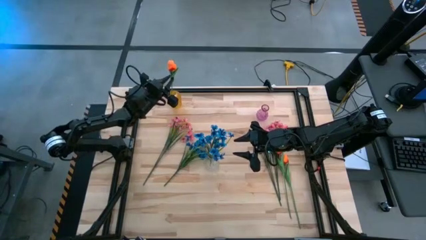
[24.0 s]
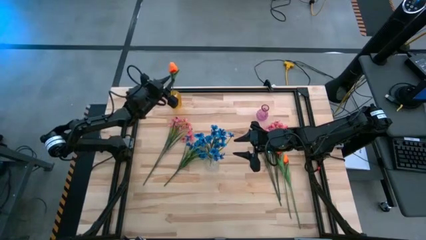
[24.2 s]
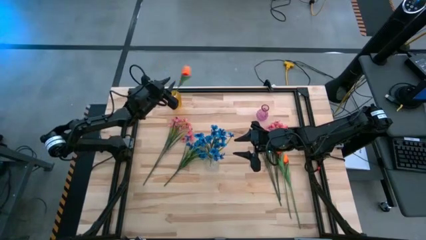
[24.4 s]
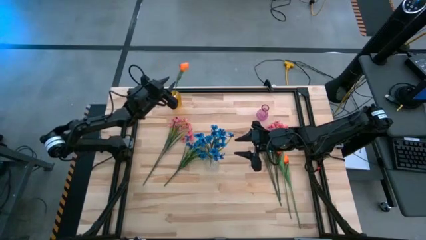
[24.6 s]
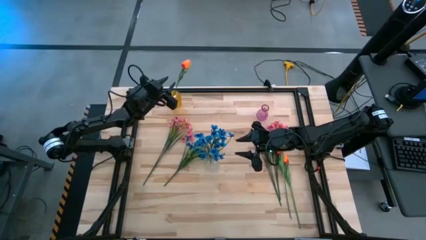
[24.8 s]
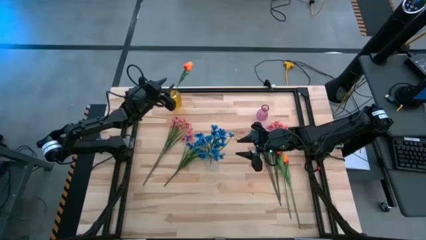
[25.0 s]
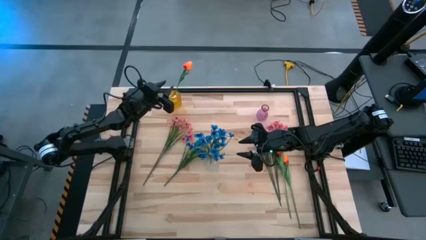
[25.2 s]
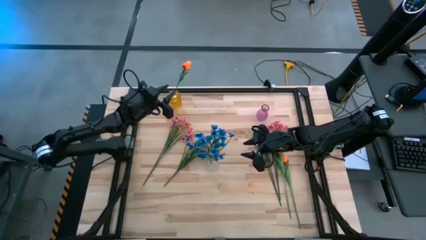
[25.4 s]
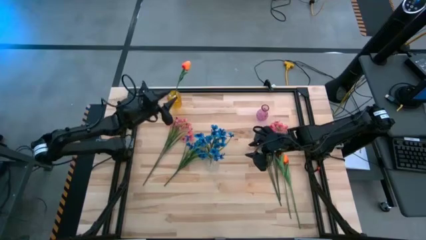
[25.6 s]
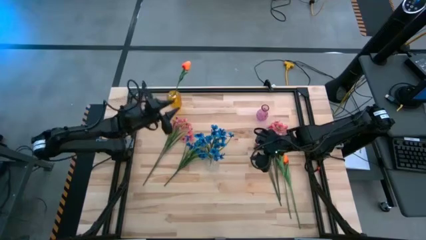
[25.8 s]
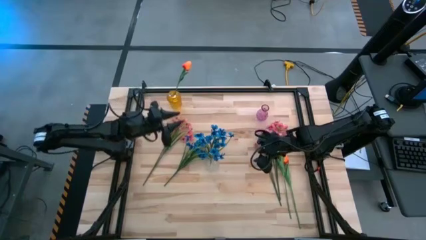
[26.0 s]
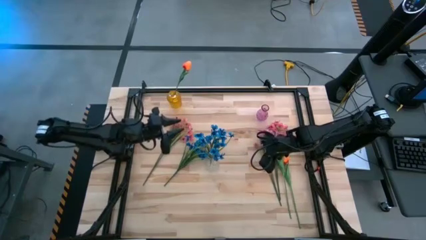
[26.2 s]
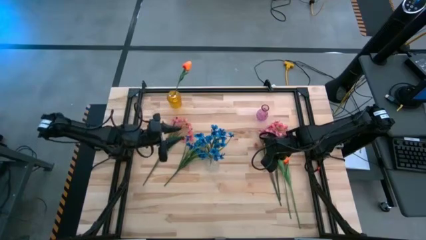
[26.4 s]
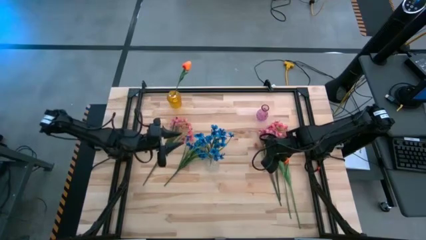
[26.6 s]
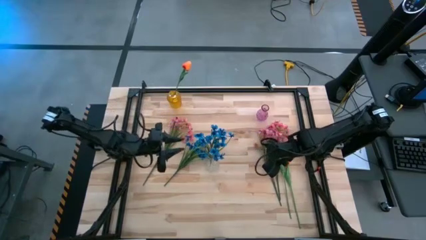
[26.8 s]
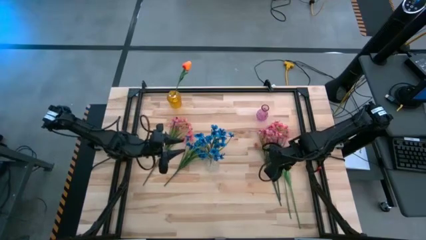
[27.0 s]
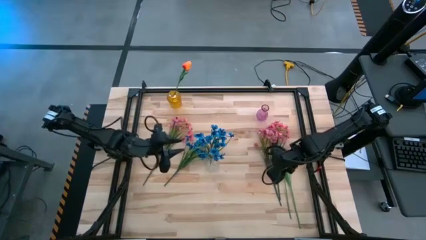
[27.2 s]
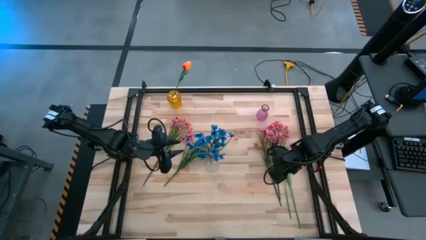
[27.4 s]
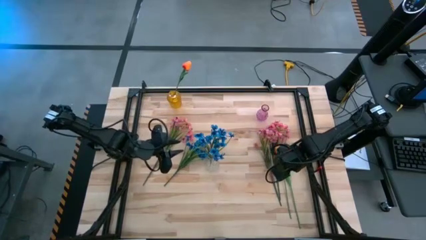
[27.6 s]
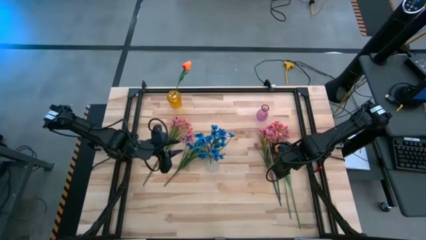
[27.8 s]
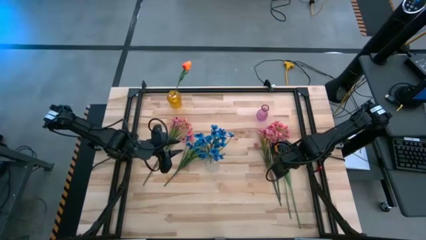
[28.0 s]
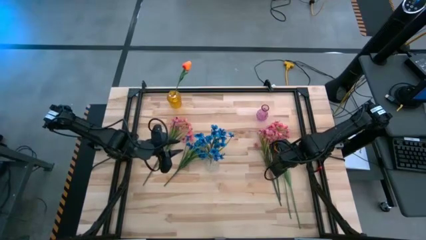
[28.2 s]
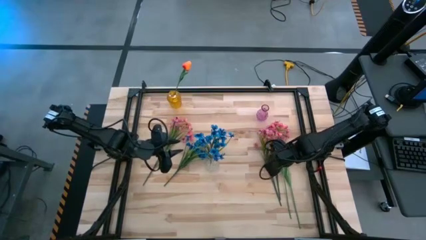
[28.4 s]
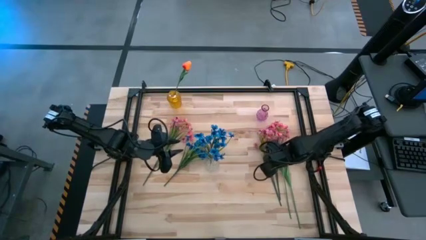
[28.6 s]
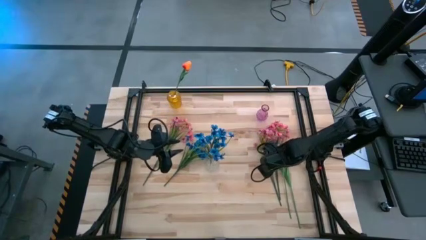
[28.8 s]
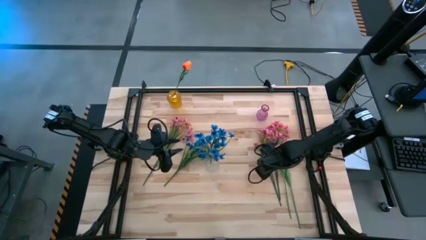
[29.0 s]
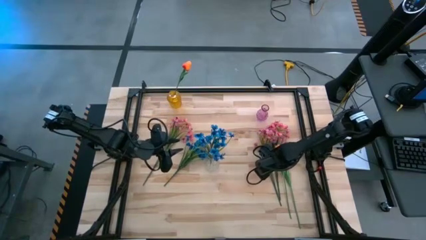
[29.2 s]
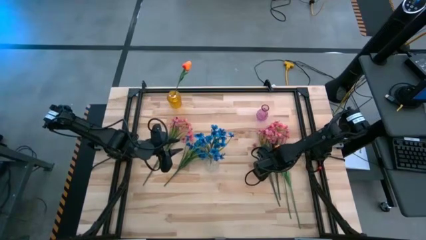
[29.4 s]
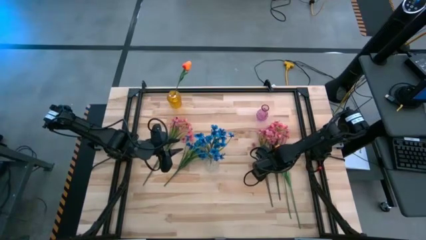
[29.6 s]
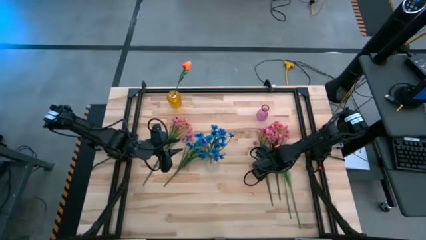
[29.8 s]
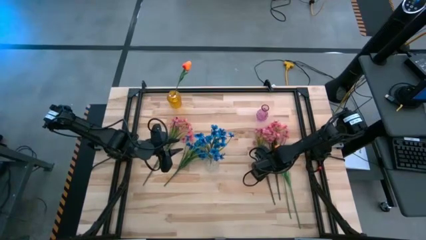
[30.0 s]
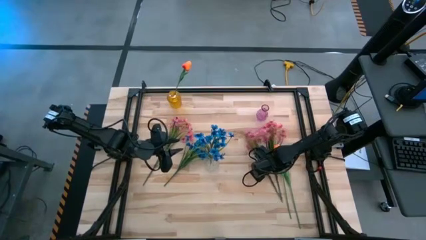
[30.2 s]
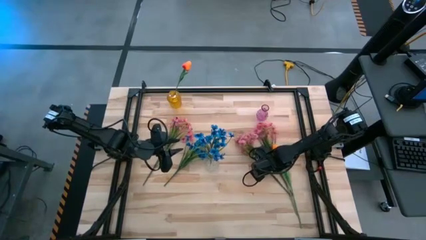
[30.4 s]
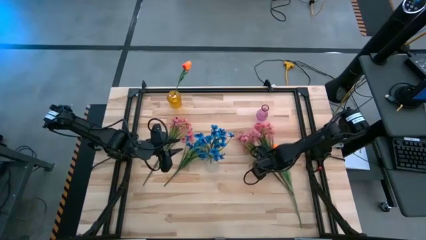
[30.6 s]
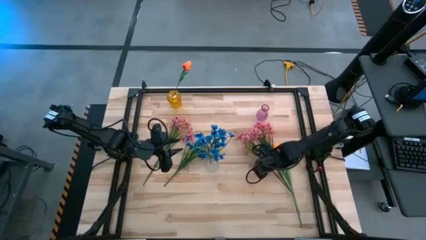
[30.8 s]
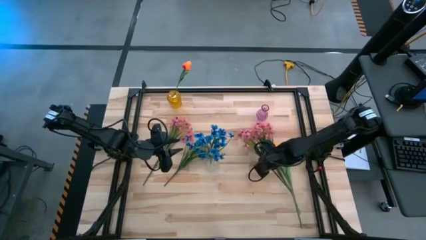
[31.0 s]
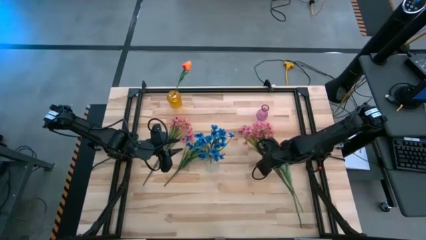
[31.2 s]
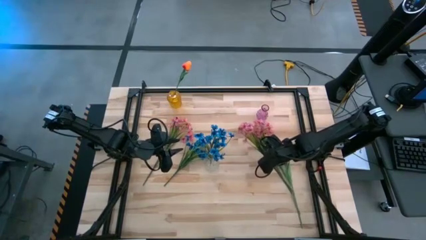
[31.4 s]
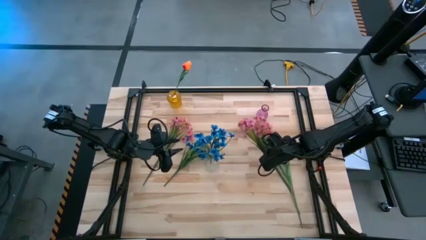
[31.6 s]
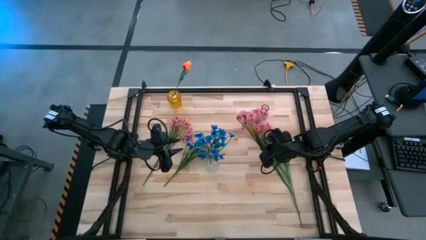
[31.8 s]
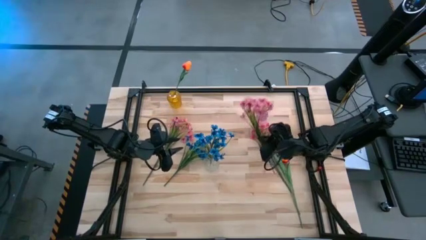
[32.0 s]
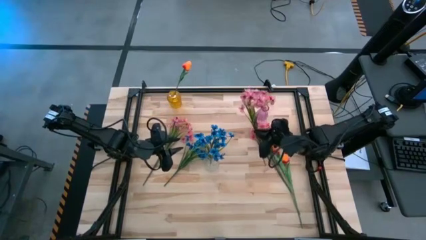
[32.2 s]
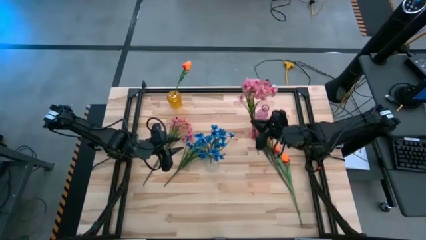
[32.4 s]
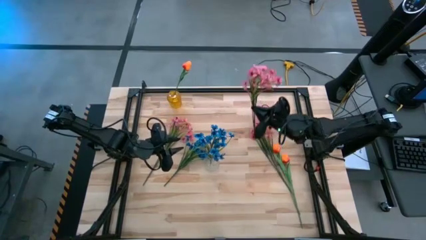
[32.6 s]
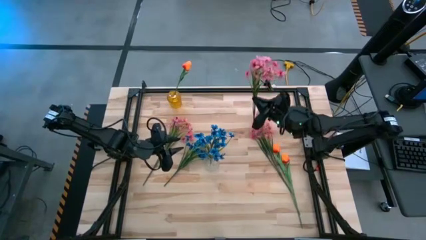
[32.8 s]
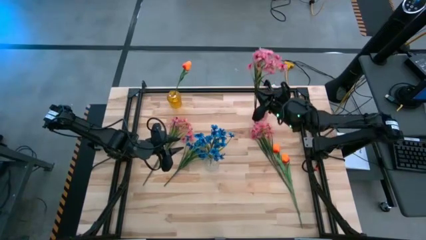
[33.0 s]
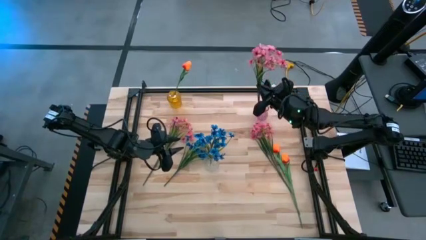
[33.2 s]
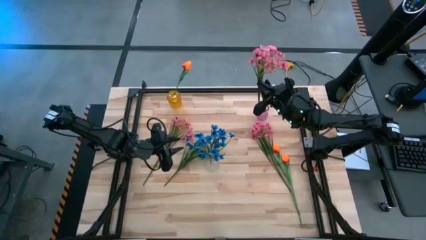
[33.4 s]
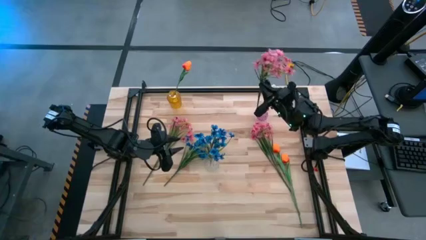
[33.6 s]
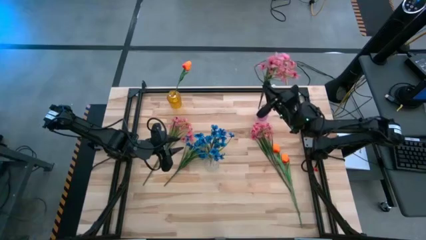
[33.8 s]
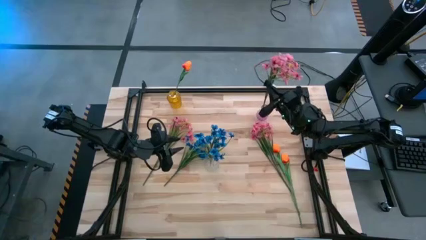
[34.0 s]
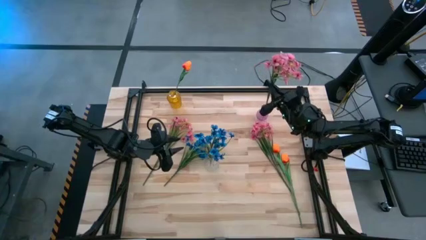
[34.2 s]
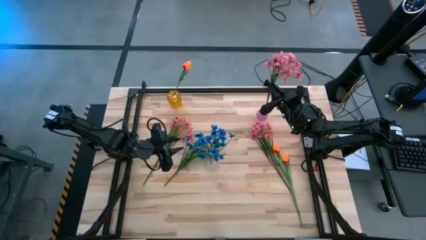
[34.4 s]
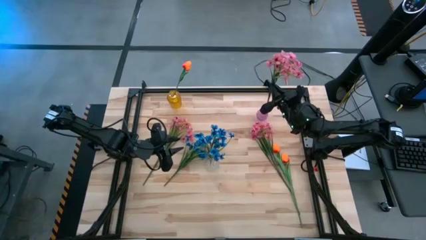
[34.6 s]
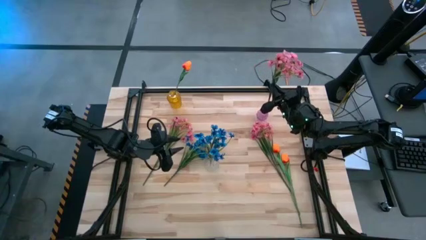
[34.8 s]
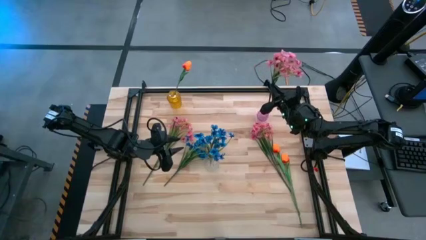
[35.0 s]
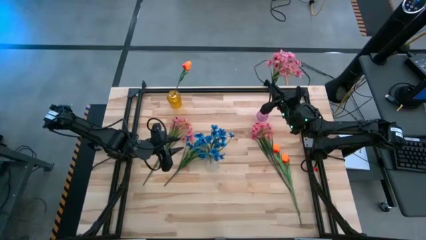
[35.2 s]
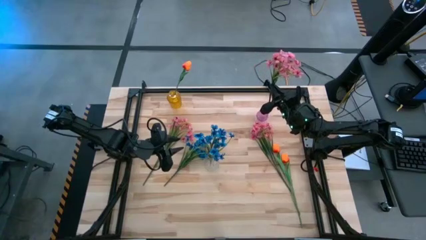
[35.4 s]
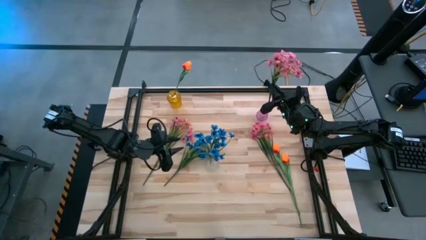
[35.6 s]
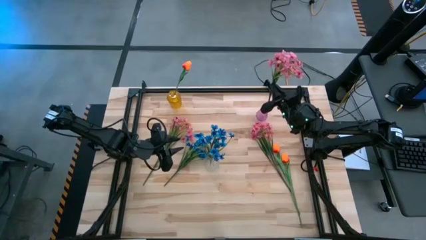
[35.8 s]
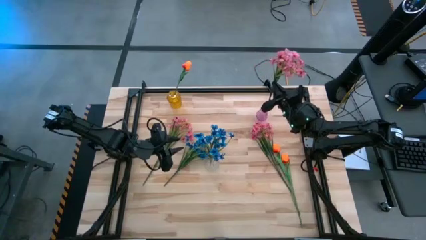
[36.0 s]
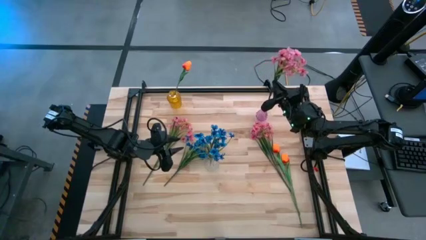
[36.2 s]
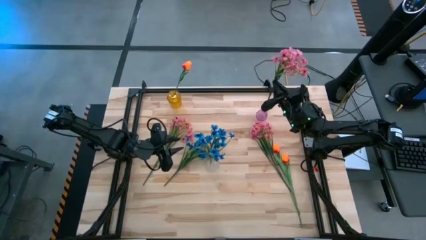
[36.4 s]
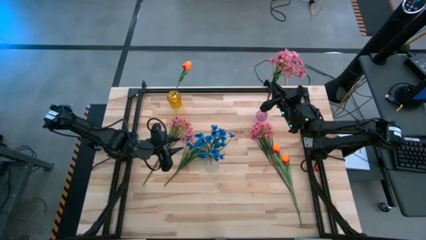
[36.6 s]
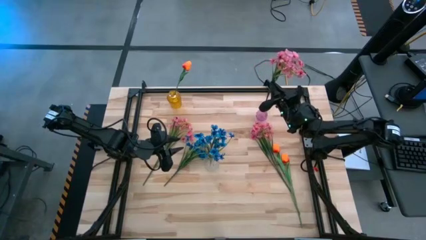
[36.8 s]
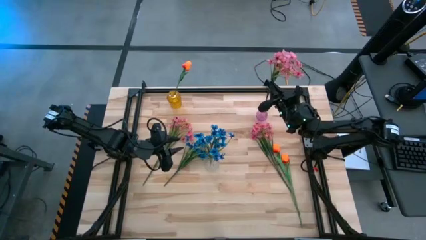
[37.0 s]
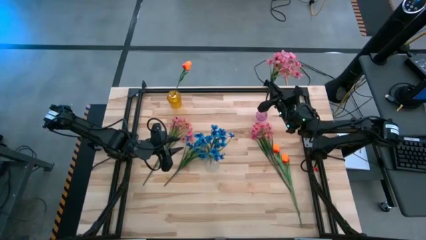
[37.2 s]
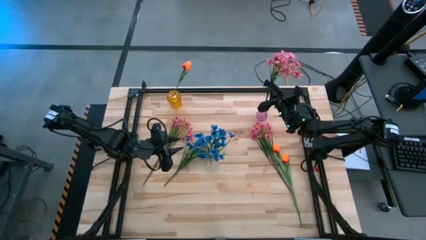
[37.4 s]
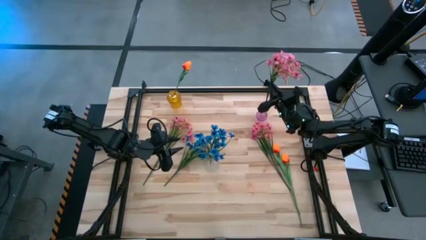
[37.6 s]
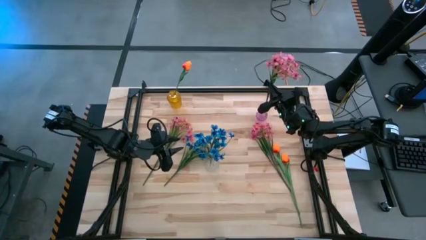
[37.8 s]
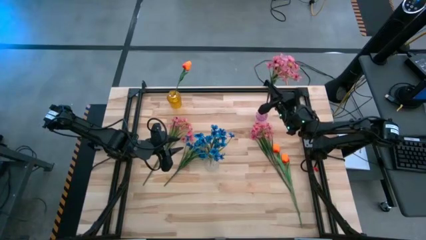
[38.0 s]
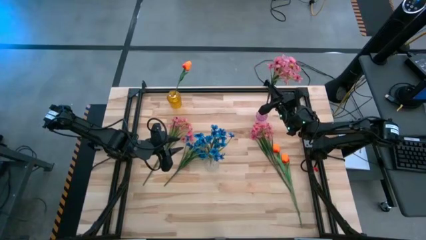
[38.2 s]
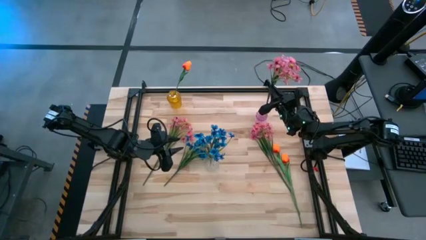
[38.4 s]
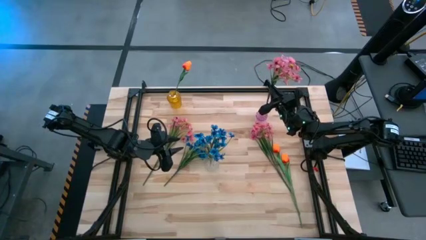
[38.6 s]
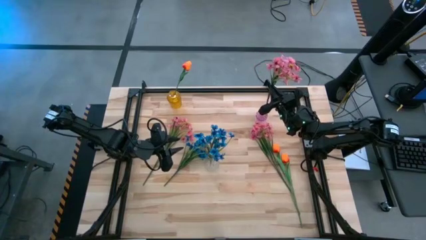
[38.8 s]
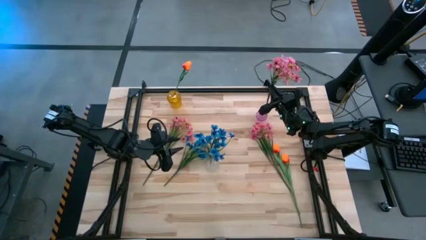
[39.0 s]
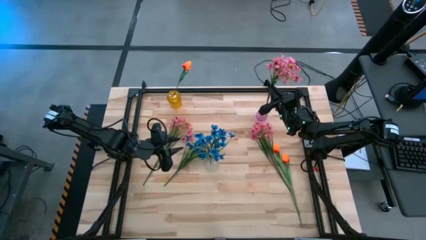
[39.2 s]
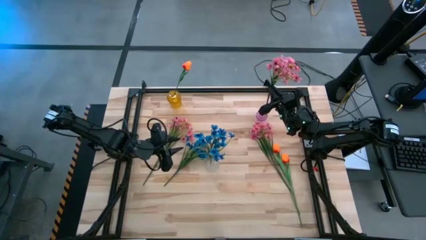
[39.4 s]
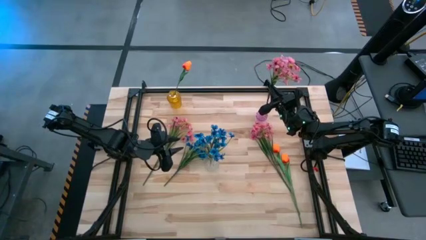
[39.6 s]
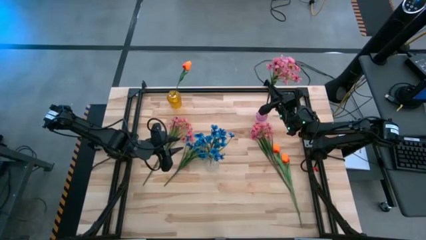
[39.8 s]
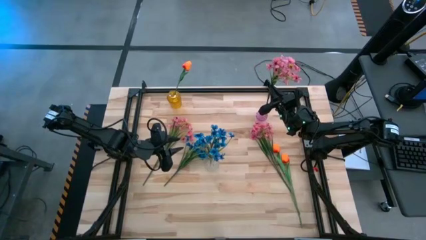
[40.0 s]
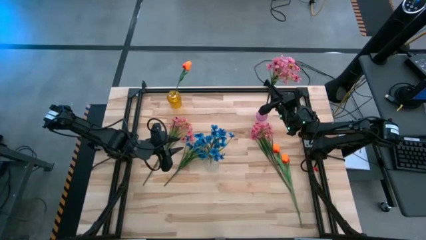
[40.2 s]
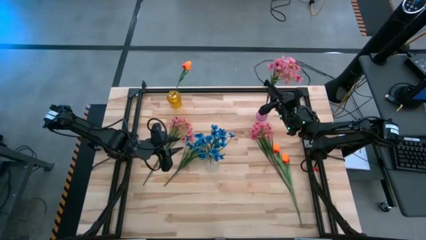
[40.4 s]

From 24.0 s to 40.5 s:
Task: Sort flowers into vase by color
Put the middle pink flowers into the pink vase
